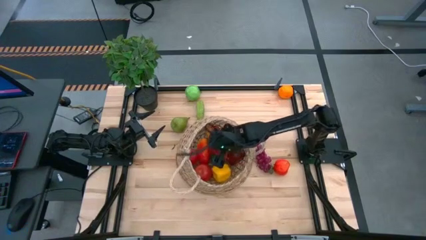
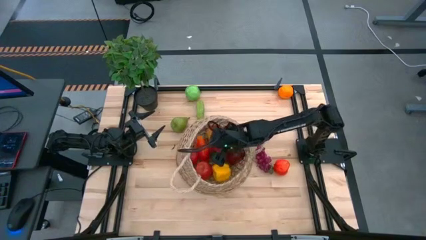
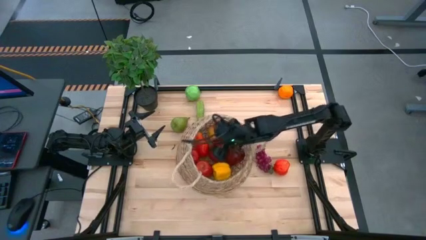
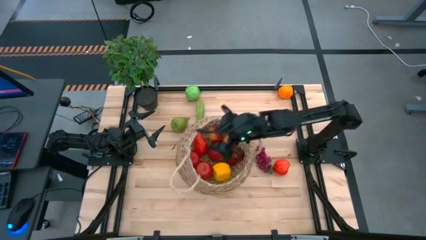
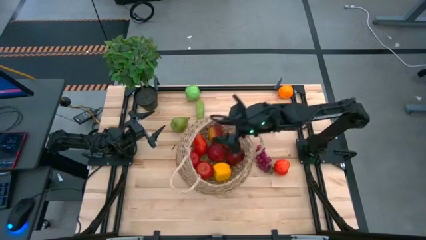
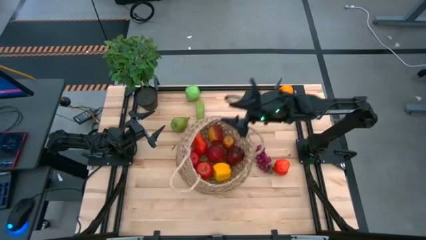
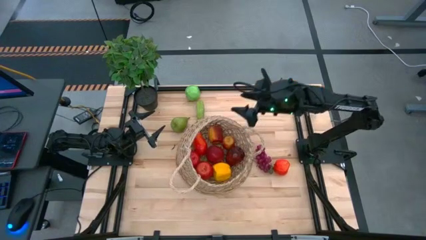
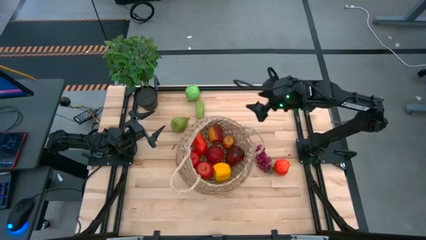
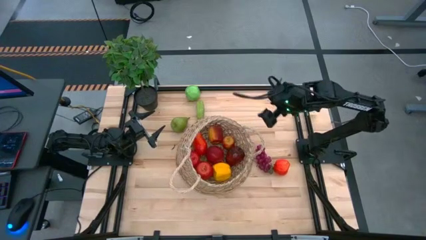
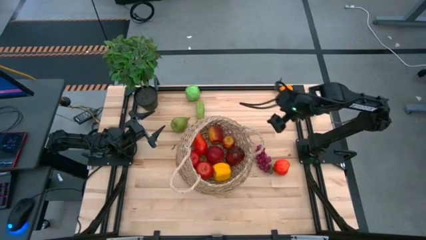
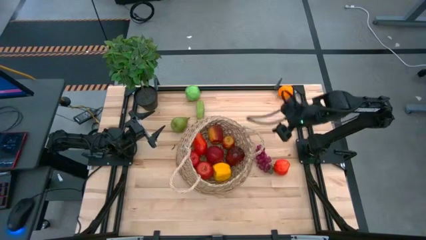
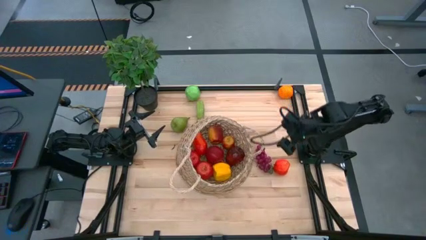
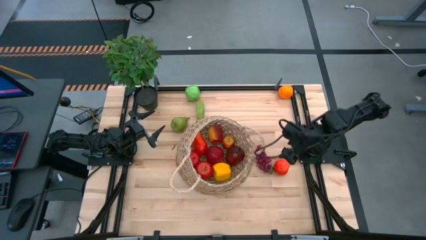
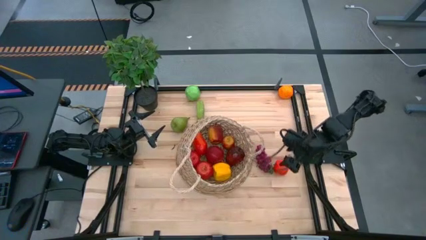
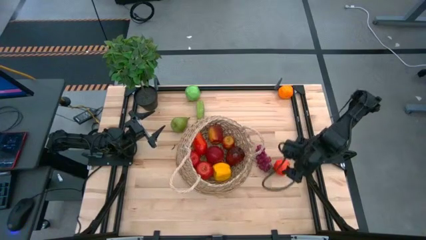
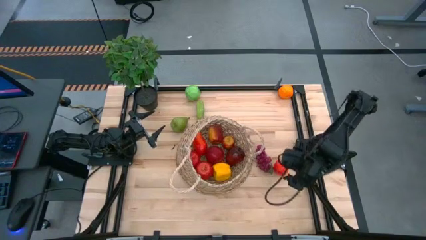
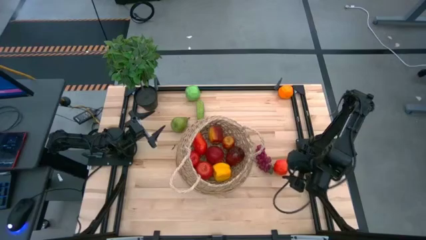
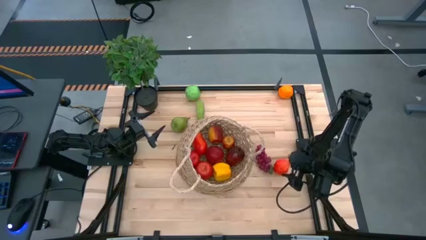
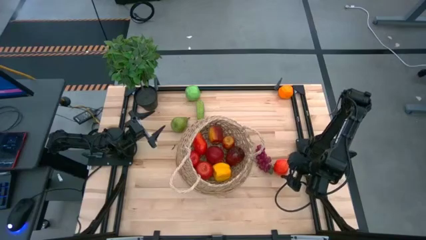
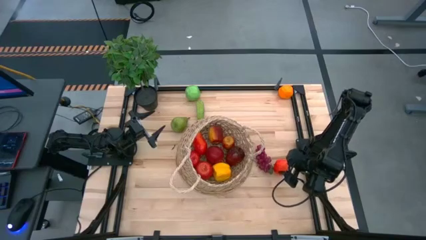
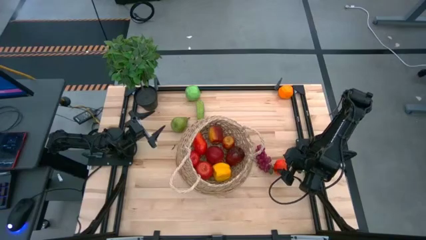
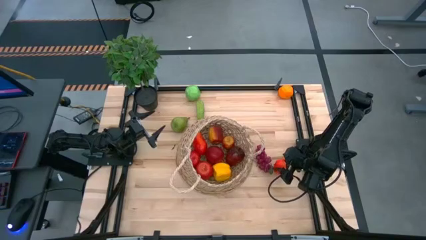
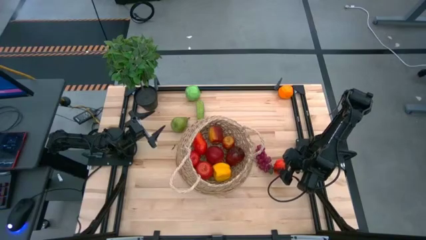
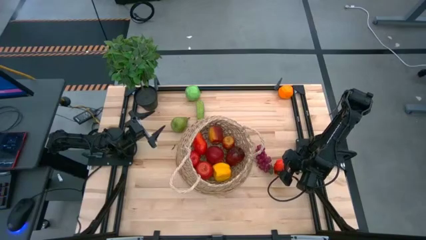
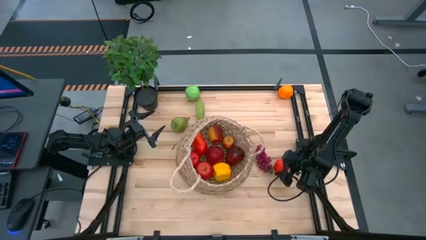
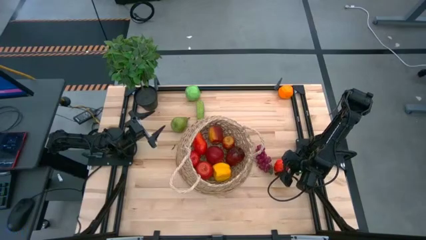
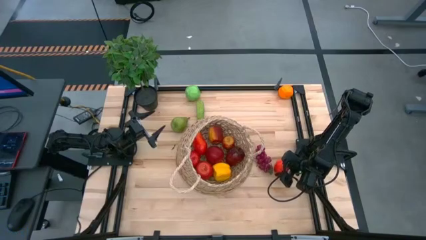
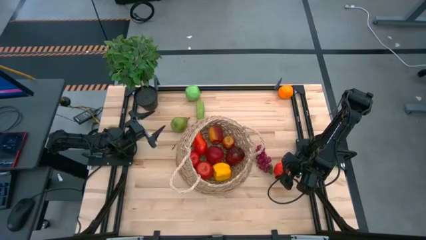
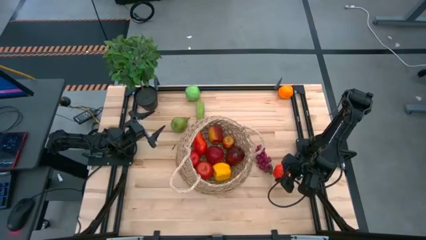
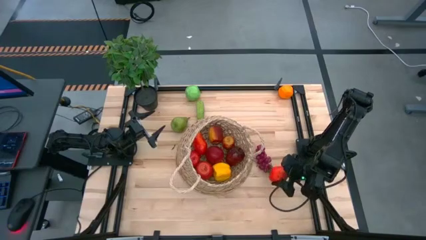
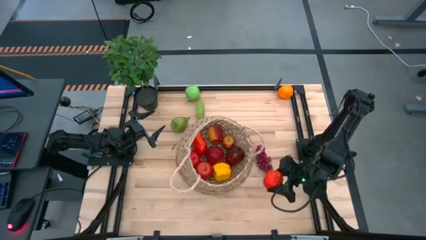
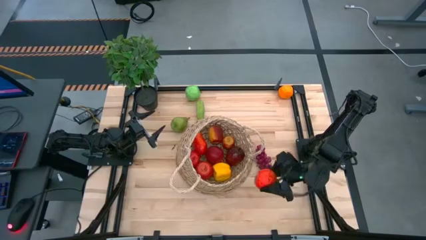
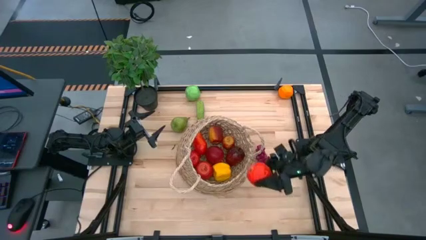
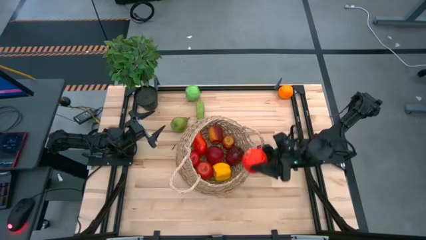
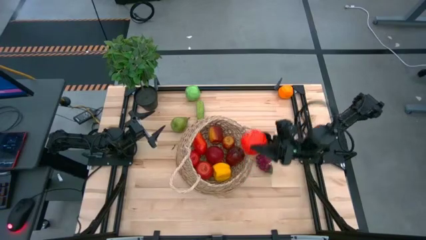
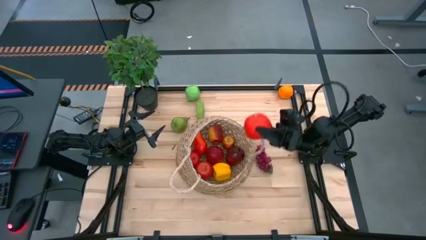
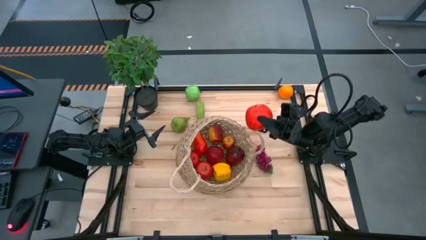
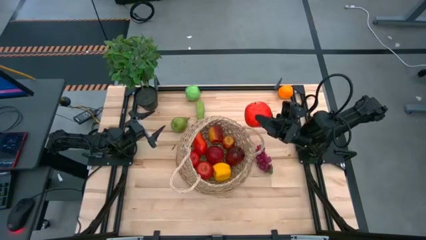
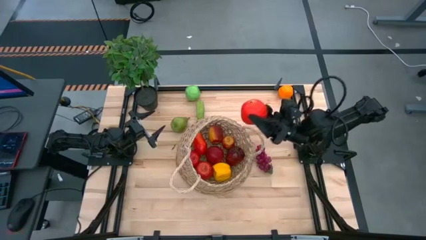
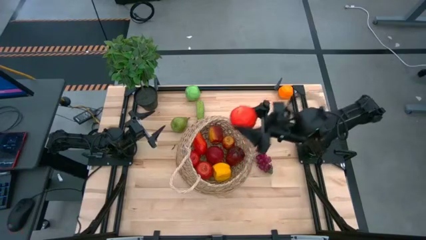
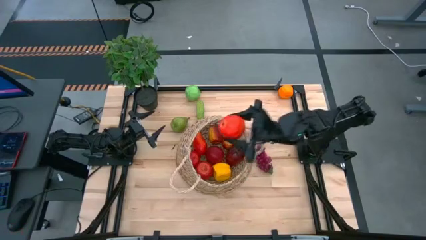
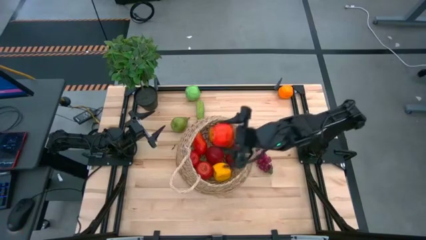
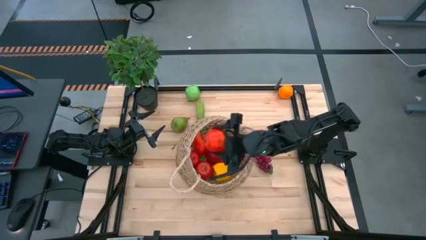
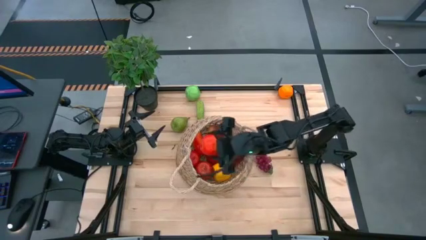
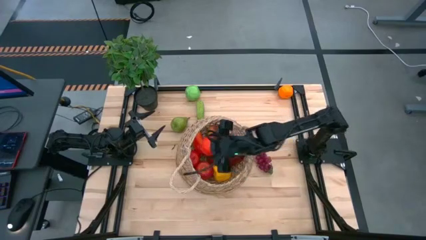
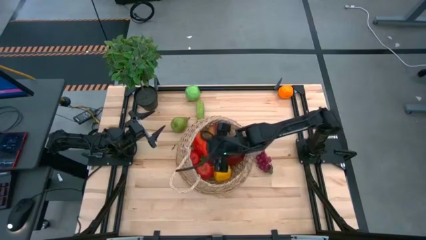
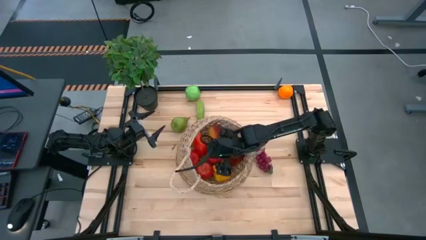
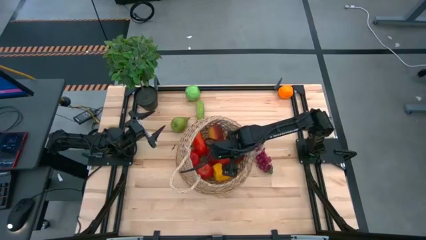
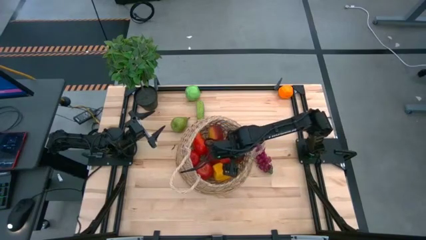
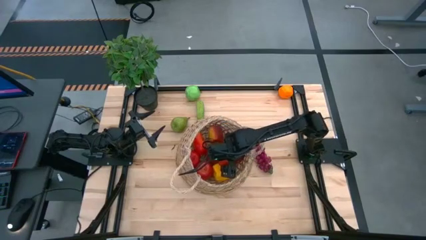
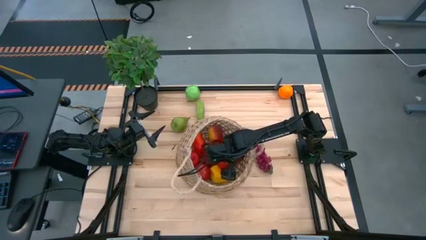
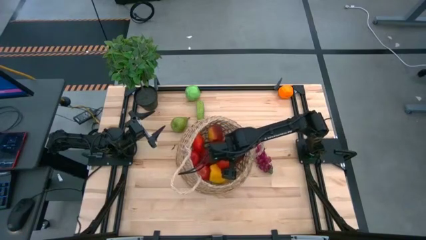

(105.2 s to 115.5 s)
Task: Build produce basket
Put the red apple into the woven basket

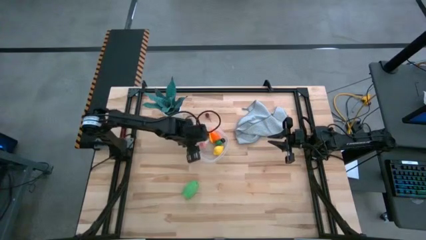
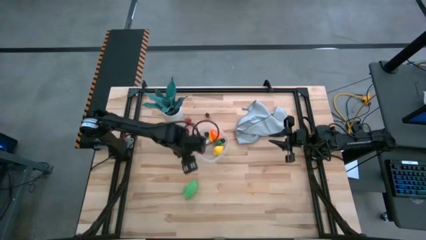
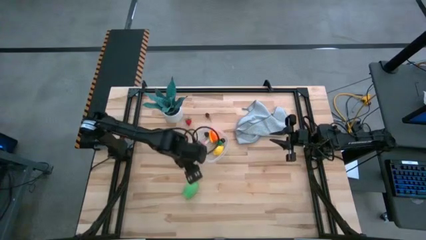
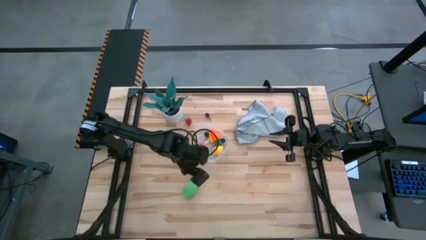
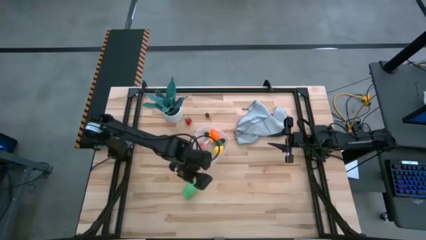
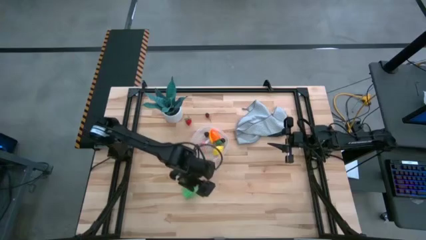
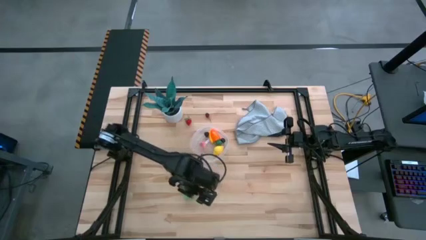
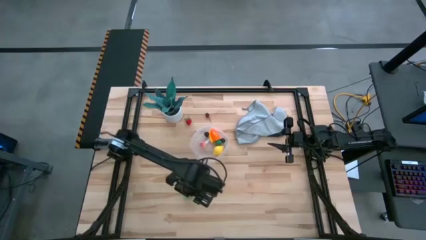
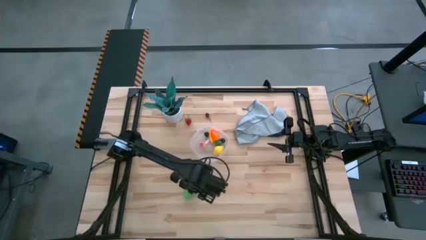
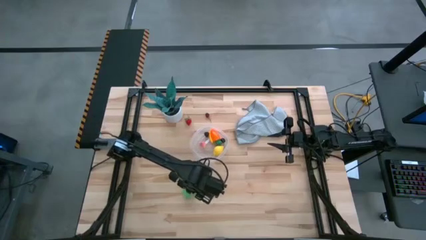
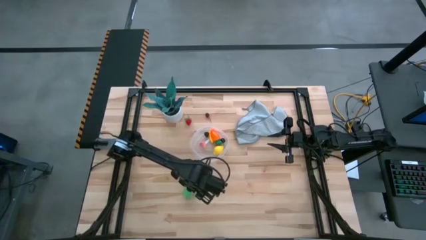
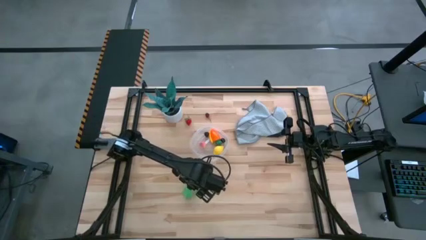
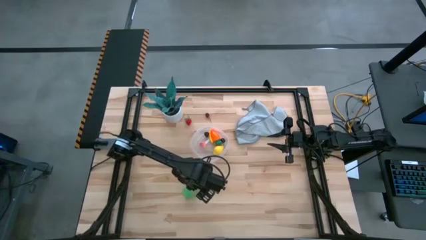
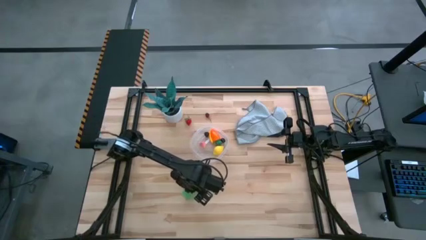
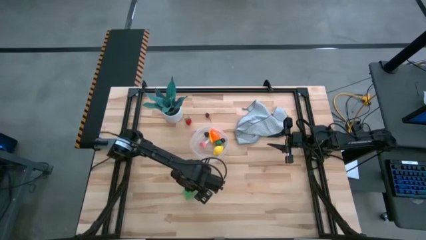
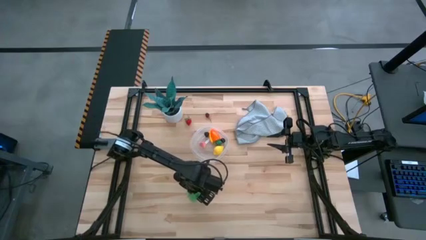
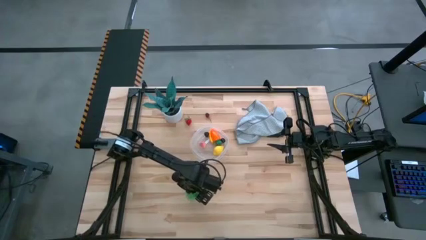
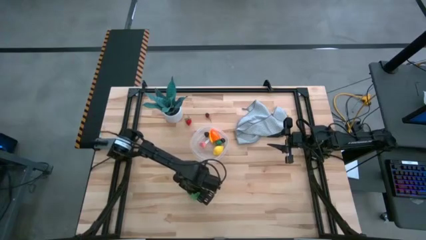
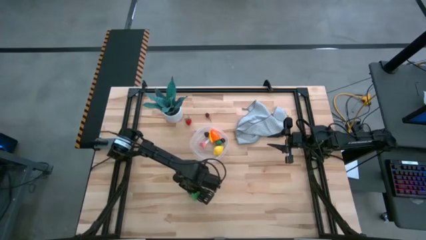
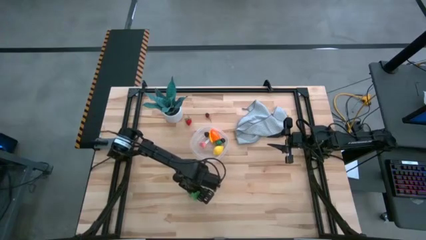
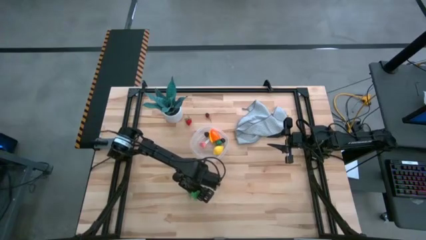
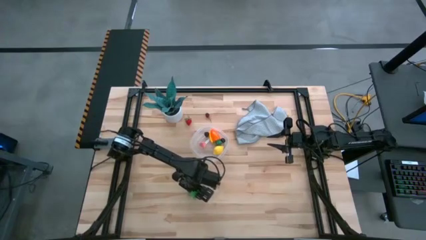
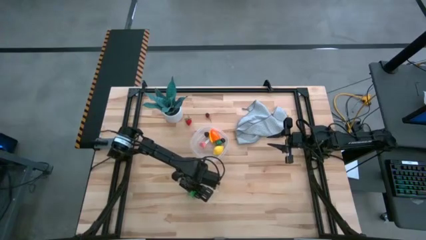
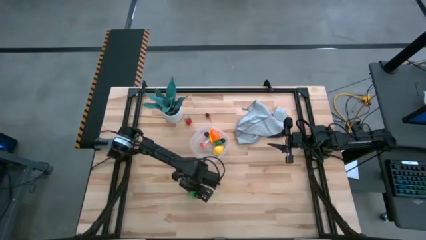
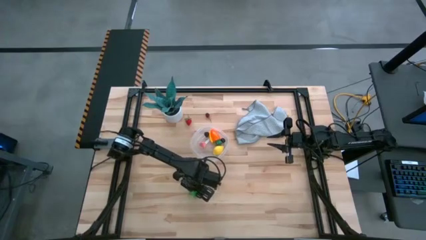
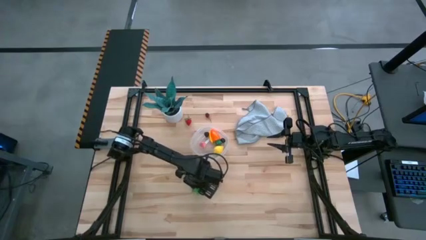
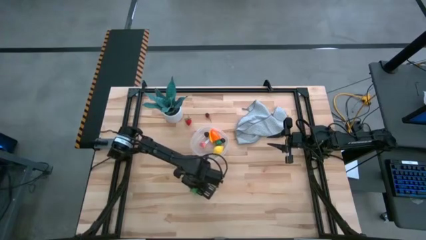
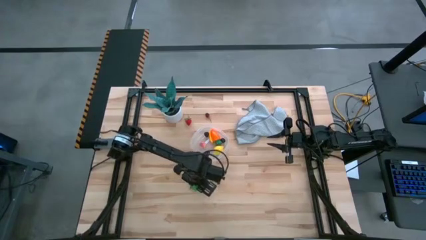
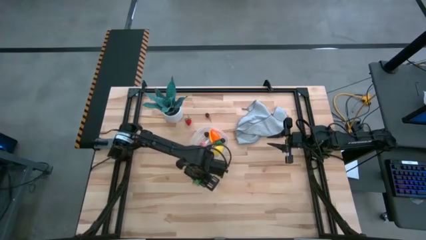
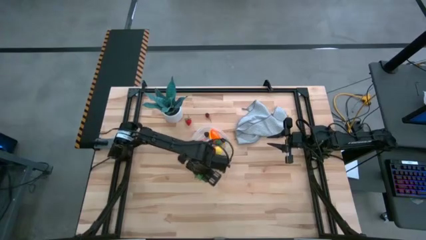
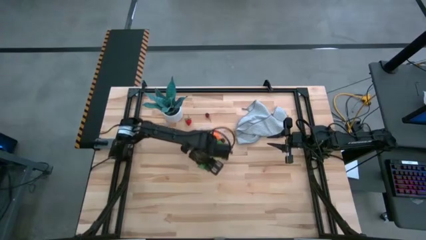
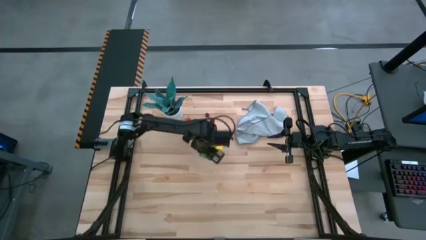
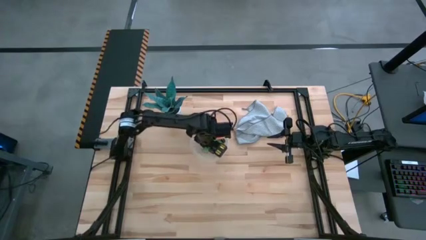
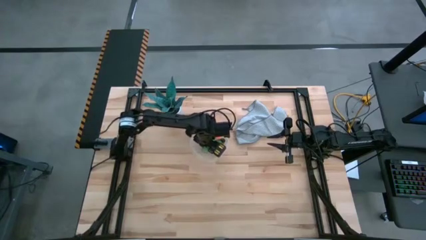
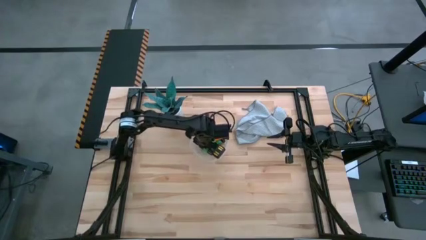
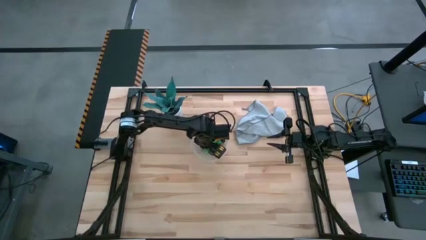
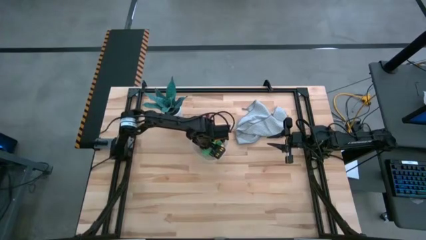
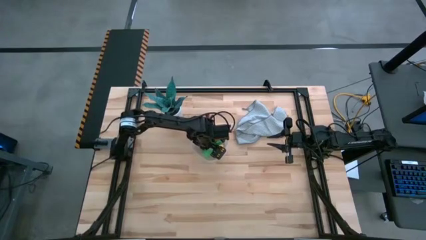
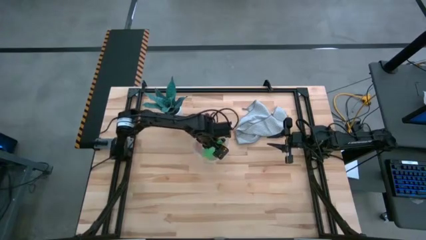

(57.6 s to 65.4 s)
Task: Pick and placing Produce into tupperware
Put the green corn into the transparent bin
